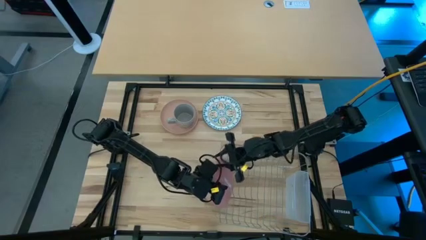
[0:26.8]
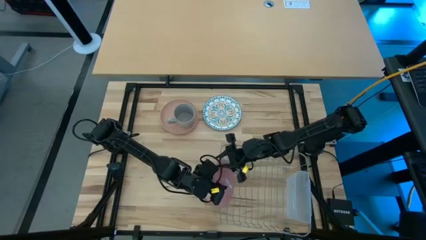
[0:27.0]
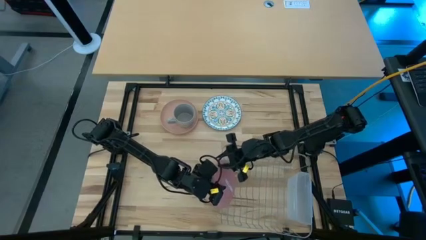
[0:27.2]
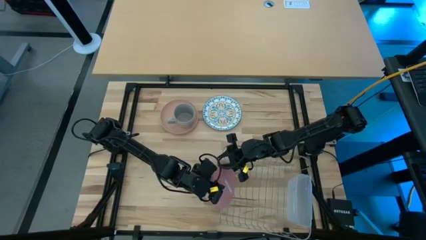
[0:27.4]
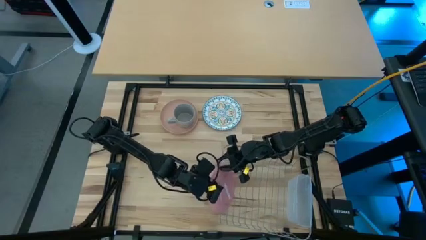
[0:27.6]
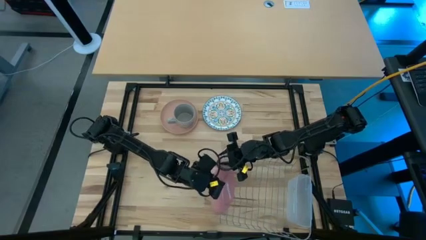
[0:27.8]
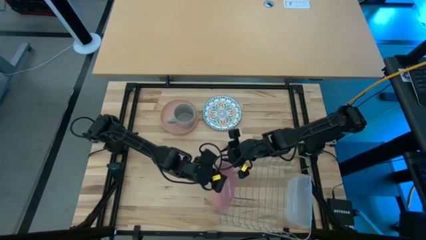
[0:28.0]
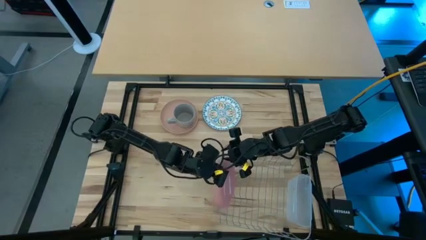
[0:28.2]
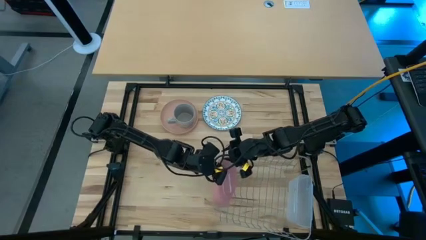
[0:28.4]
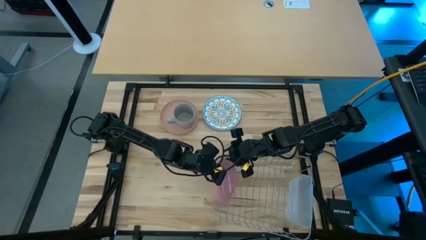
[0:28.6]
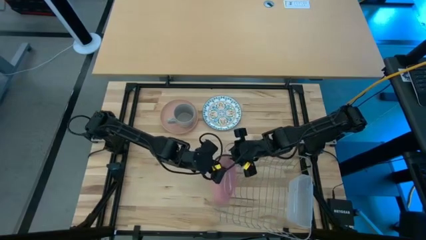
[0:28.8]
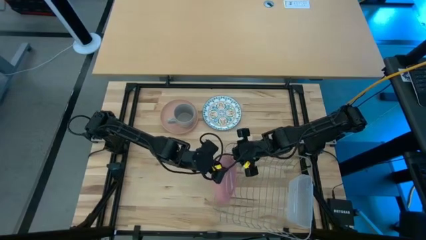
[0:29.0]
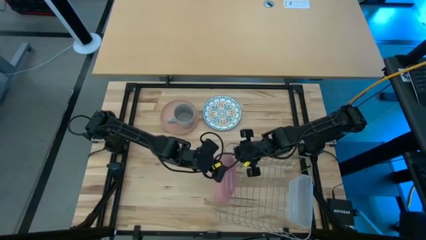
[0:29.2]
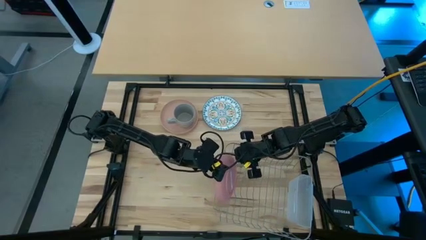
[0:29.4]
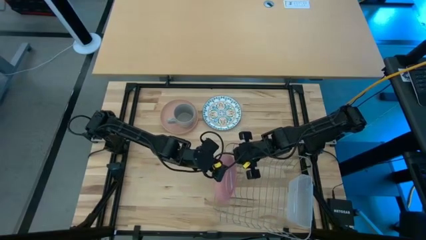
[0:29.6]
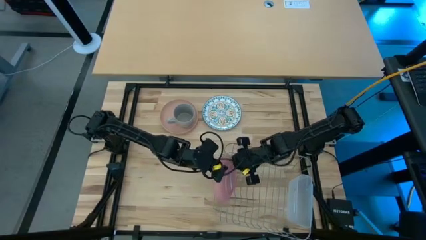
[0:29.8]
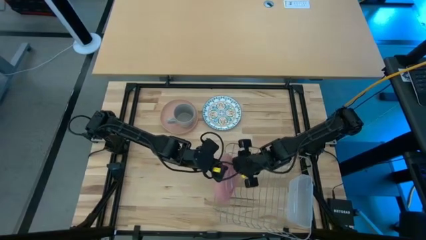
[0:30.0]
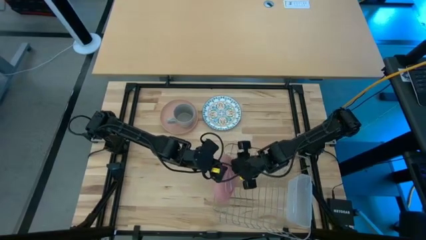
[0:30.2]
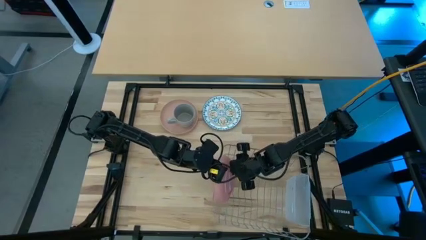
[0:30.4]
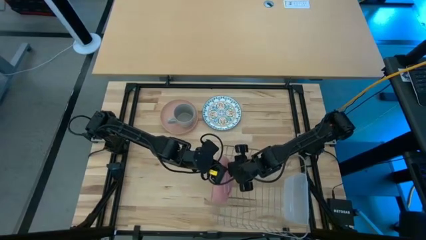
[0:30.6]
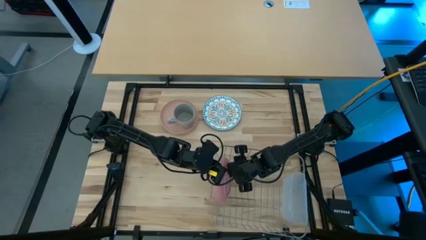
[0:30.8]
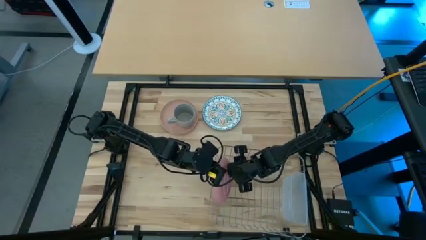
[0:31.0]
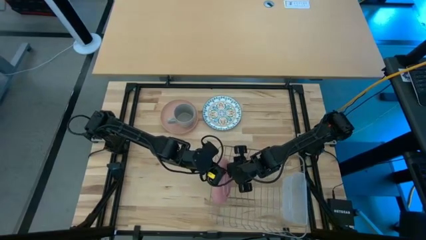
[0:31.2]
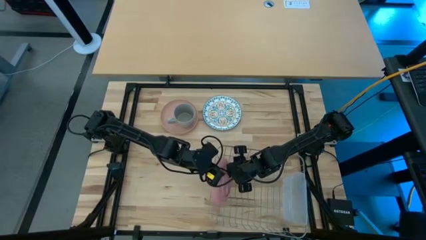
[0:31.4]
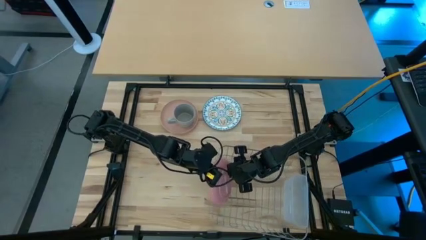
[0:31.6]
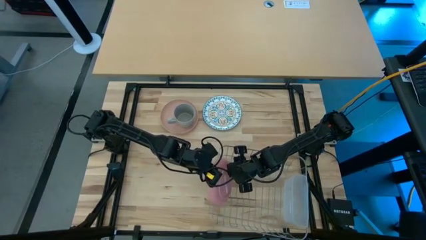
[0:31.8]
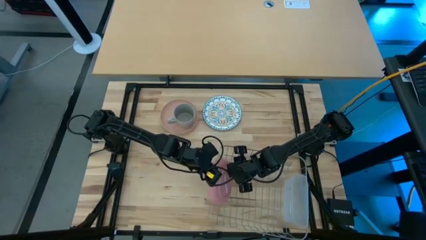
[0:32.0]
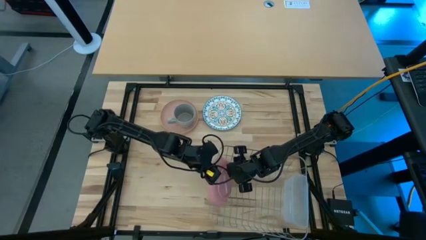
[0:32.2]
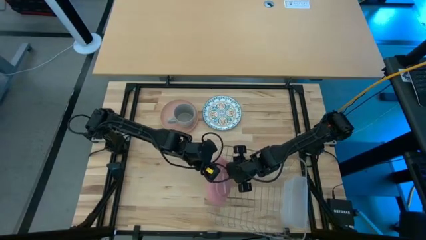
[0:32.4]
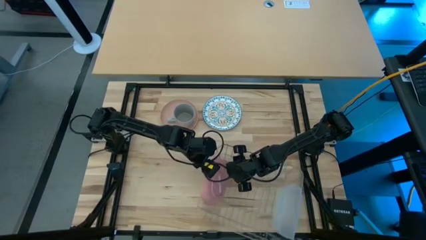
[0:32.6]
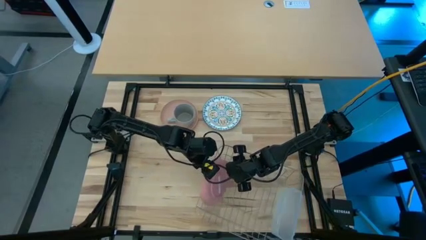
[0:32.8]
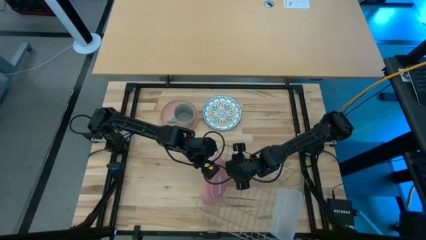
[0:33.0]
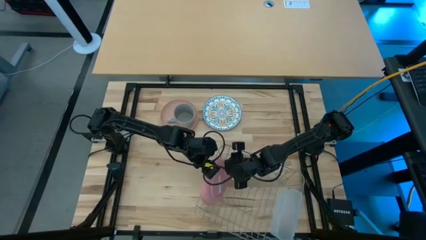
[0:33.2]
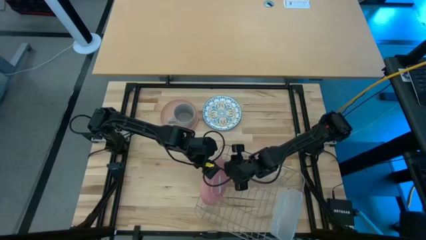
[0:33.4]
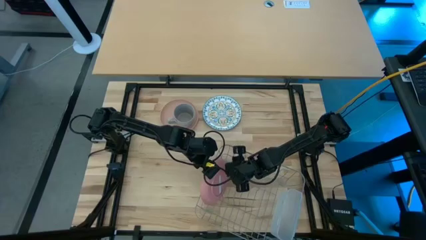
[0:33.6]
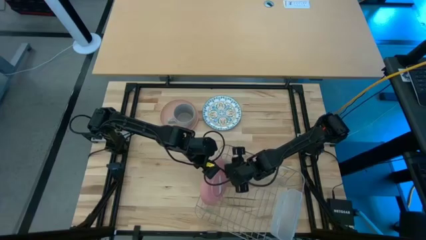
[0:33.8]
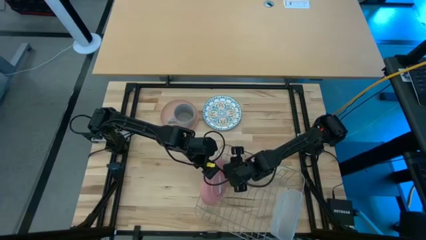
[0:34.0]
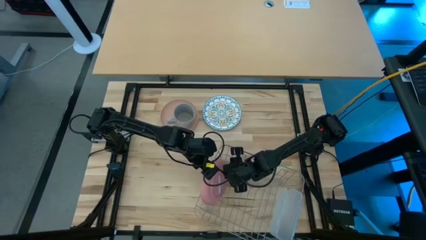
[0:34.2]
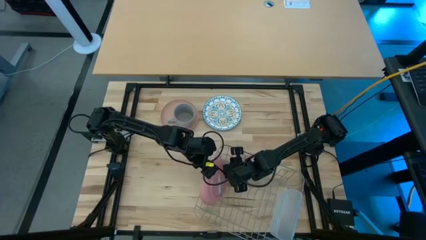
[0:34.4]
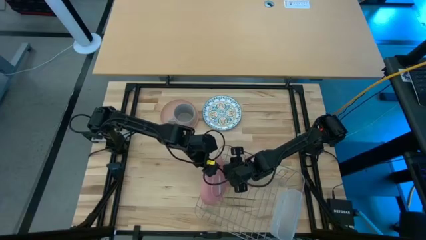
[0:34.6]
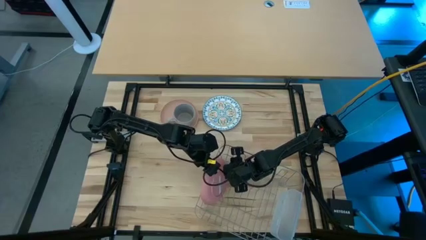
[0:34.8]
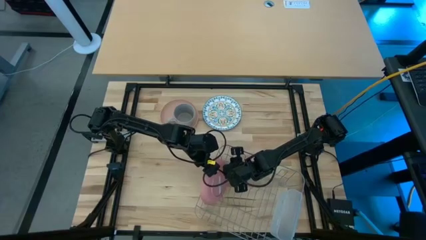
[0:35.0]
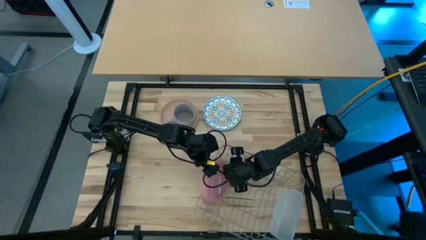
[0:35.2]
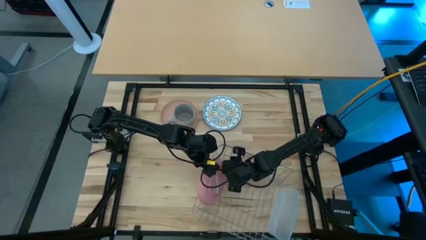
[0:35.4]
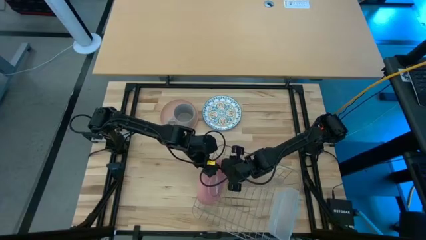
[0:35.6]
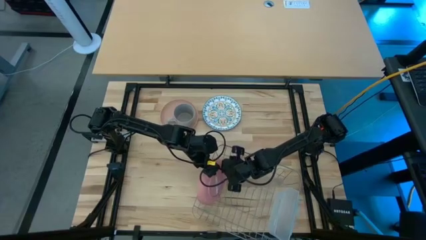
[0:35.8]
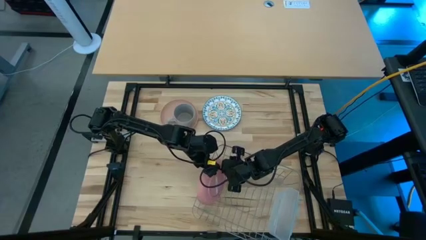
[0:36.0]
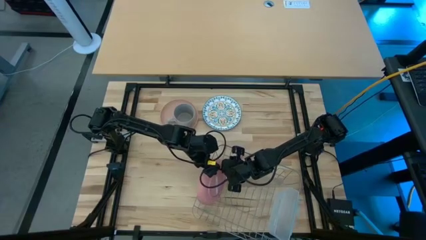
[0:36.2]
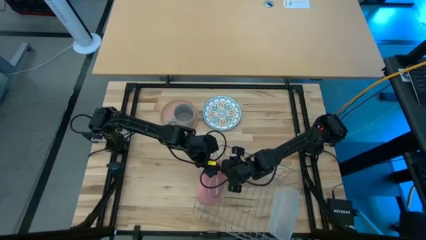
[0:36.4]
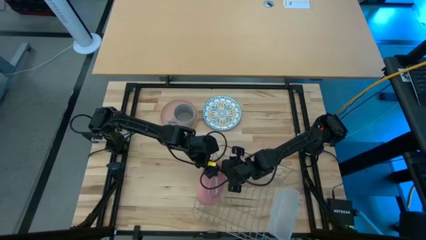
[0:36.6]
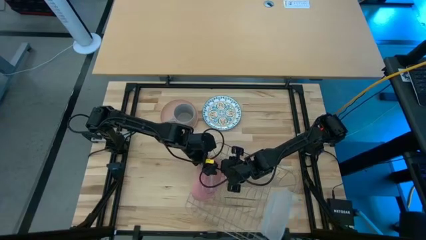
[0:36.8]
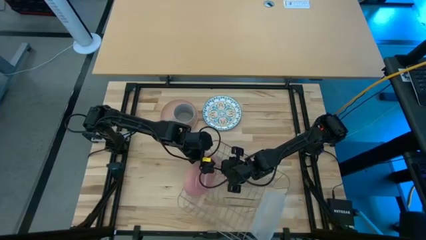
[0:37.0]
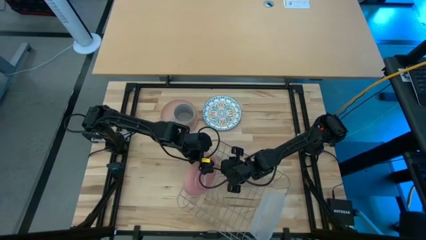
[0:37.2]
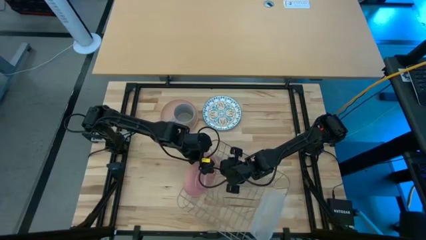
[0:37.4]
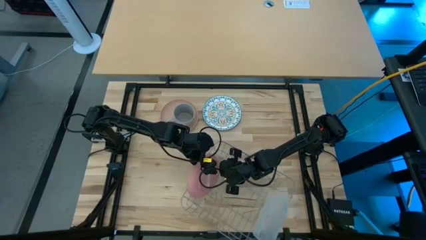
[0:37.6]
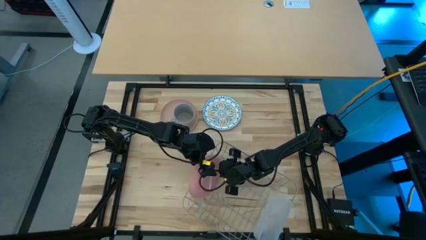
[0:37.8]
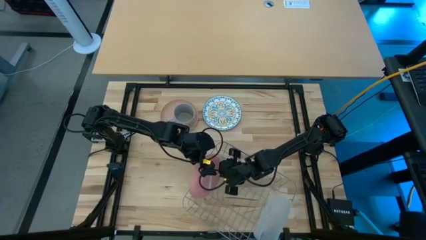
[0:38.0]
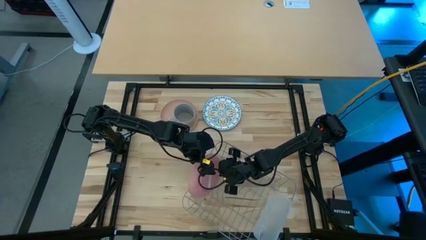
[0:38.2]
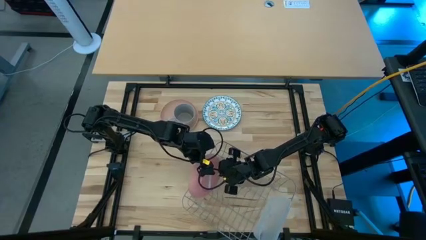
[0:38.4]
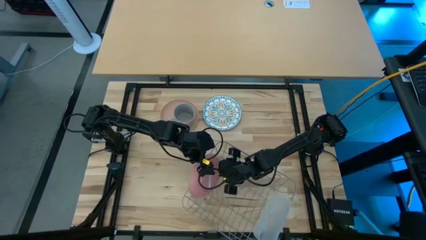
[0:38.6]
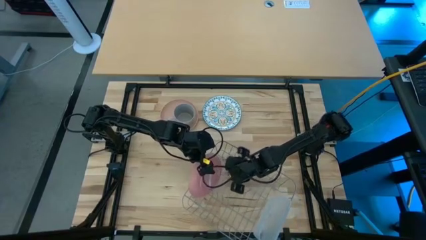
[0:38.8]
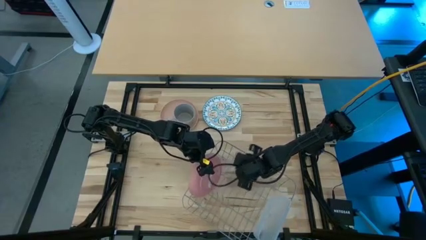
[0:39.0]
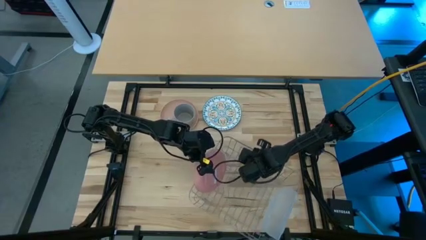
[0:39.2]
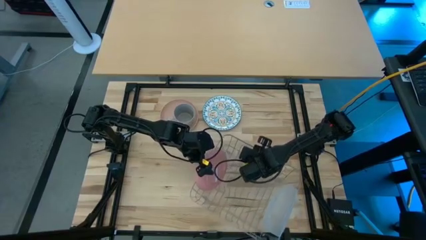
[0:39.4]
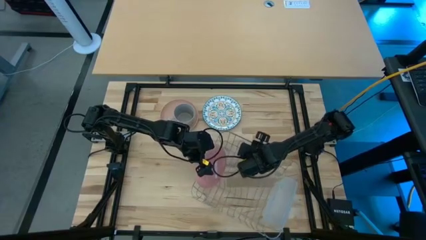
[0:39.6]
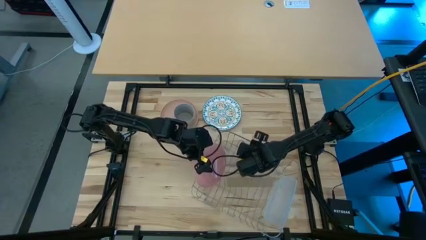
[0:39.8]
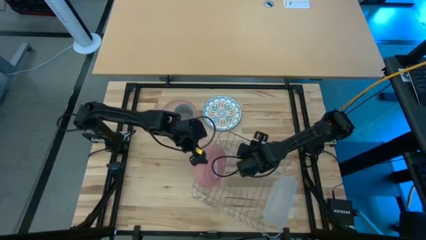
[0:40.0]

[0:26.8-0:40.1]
Task: Sort dishes
Put the pink plate into the dish rack
